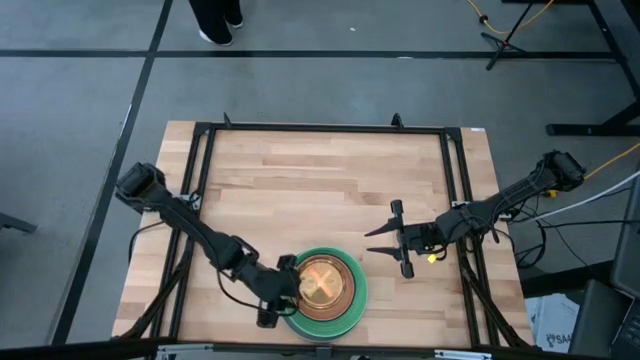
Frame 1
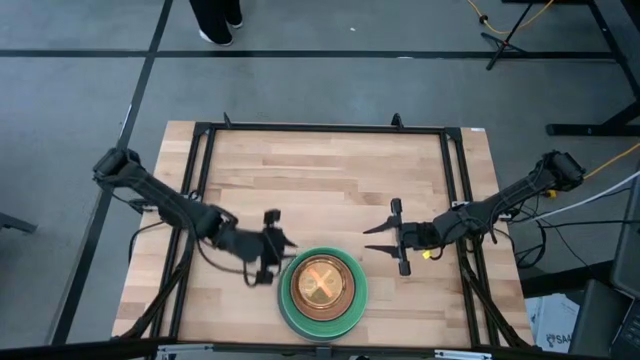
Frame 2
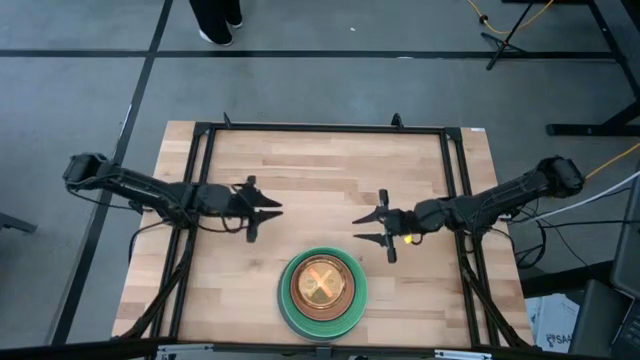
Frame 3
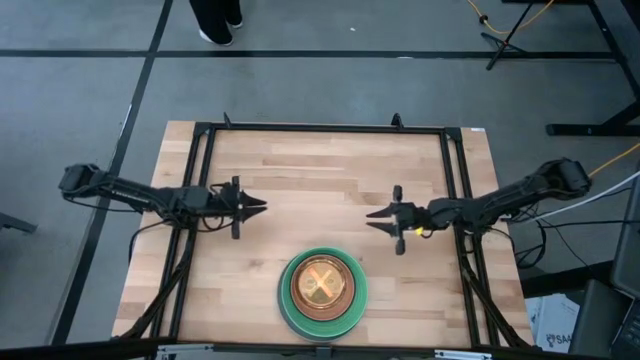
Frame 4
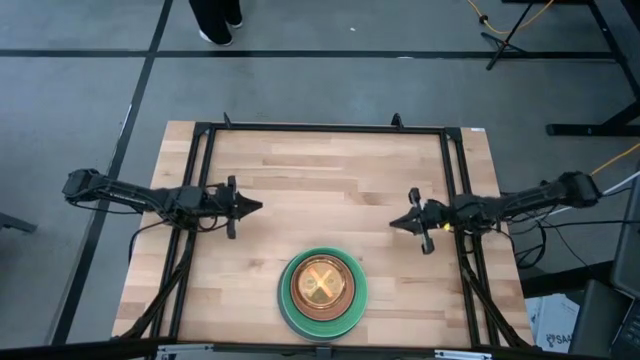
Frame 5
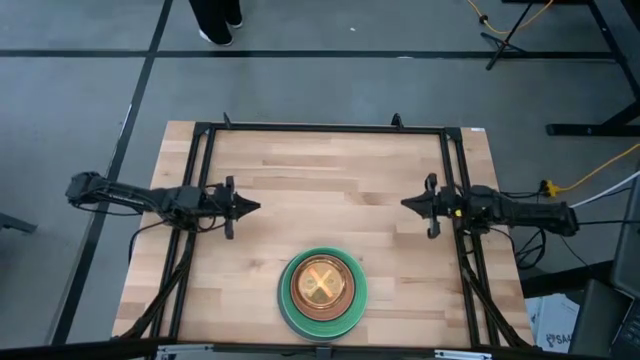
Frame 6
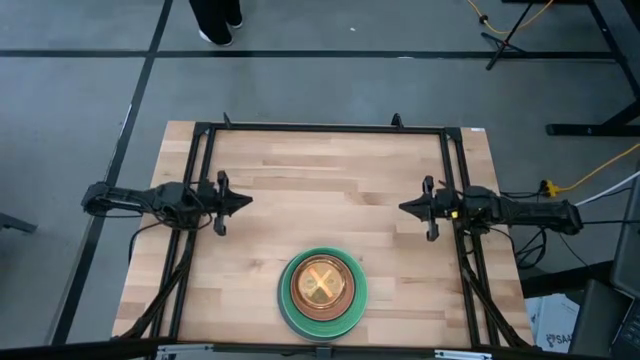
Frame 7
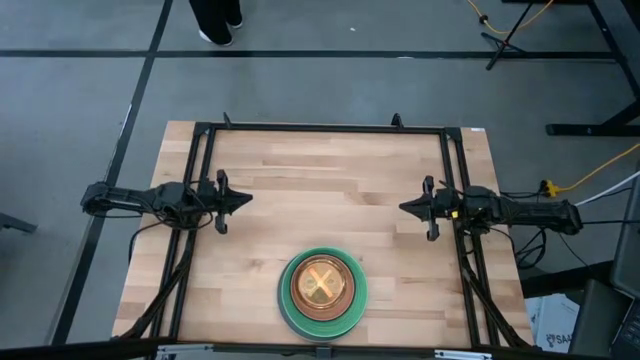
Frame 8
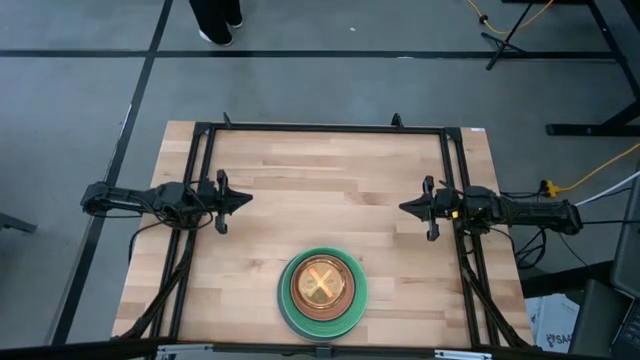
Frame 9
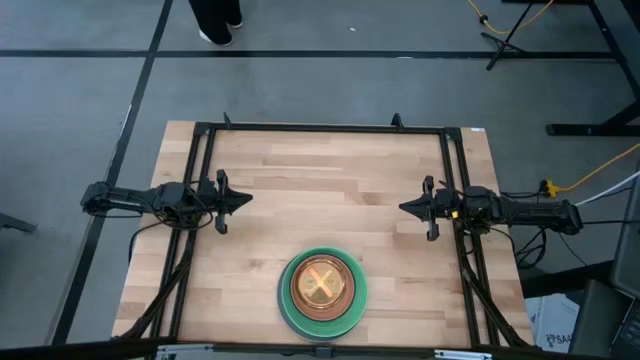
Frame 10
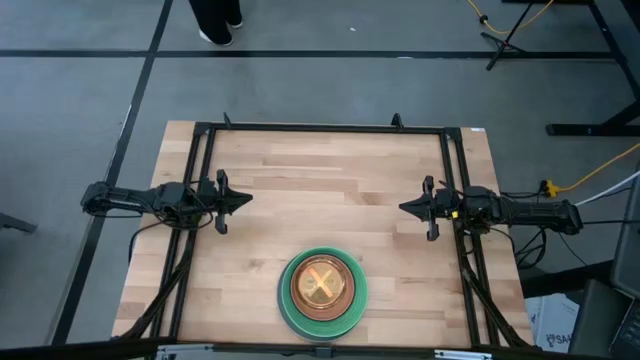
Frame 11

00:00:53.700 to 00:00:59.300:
Task: Stack plastic plates
Return to Home Position

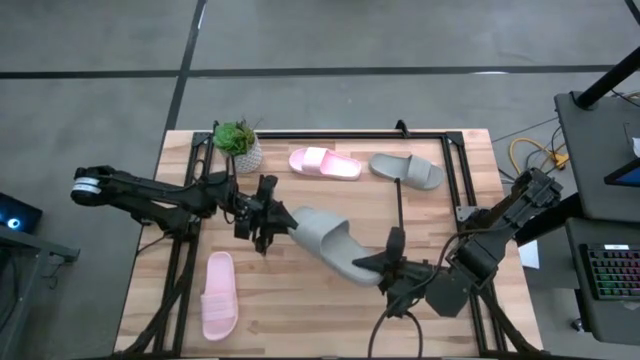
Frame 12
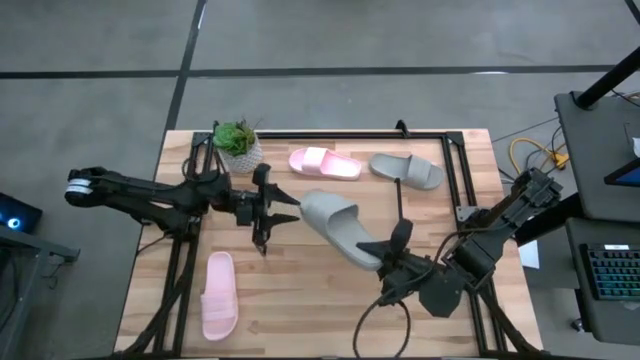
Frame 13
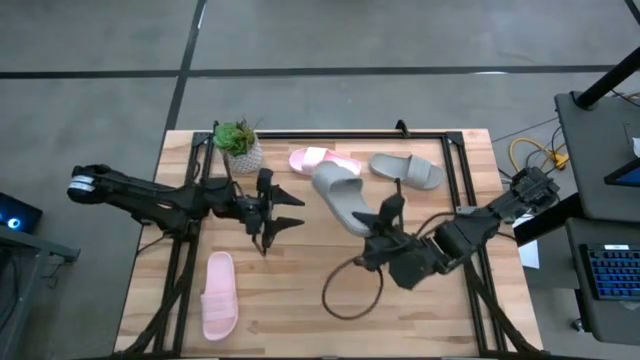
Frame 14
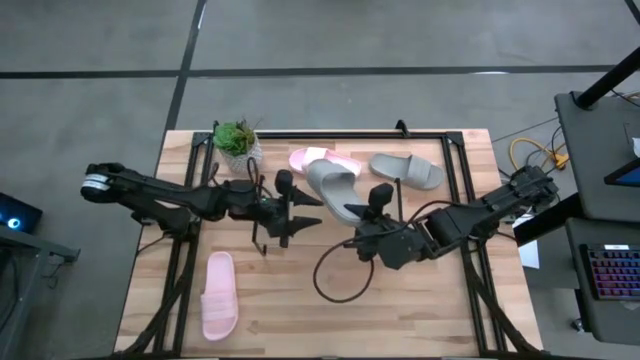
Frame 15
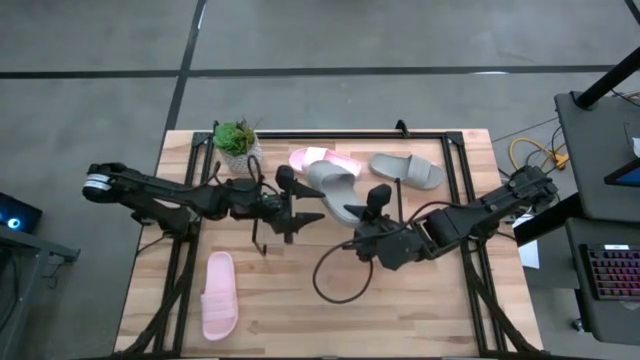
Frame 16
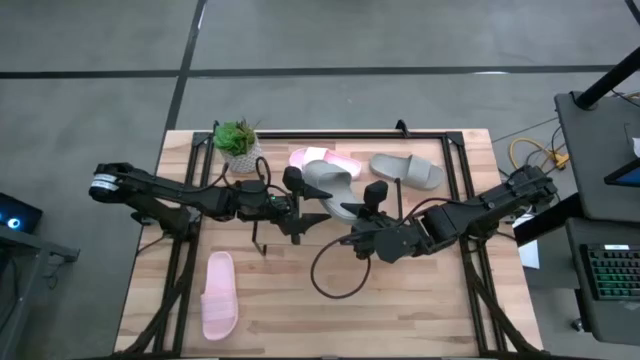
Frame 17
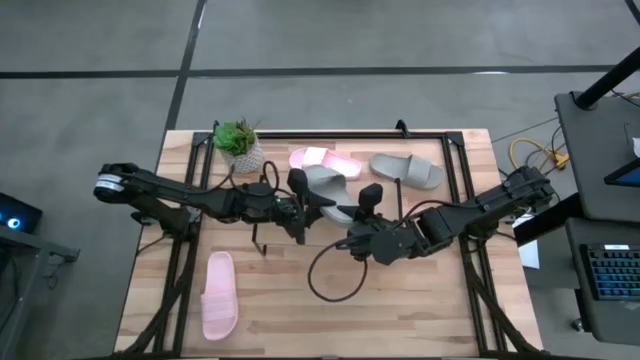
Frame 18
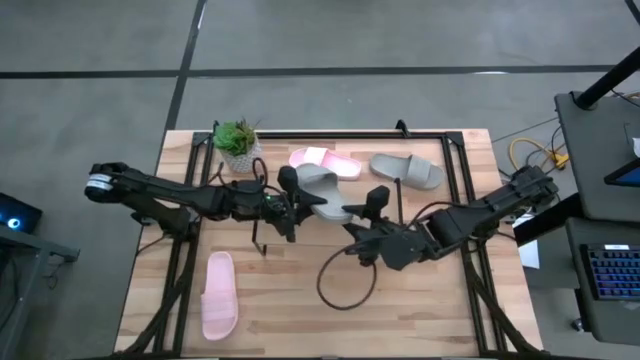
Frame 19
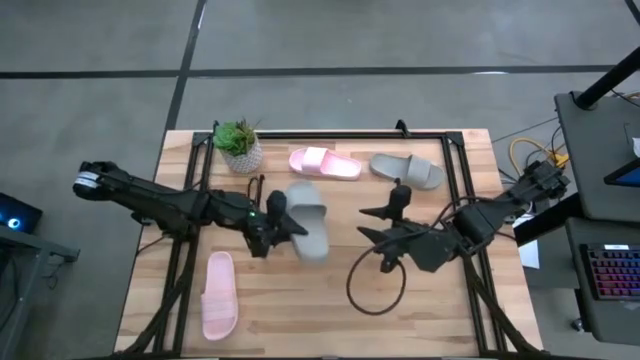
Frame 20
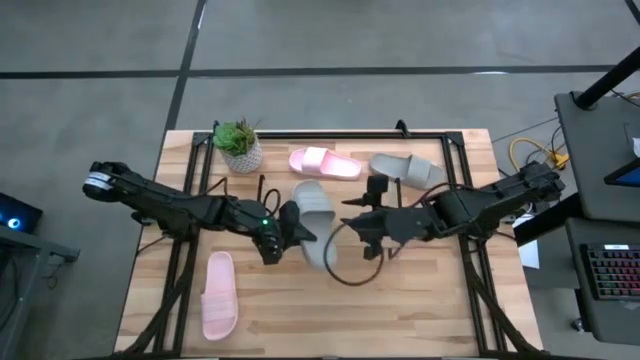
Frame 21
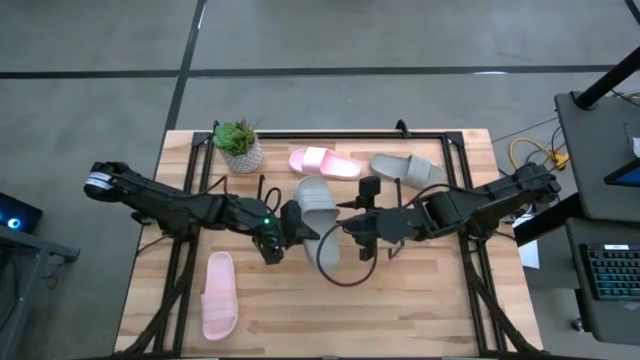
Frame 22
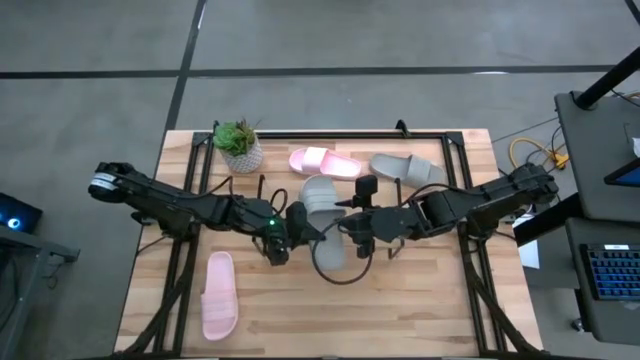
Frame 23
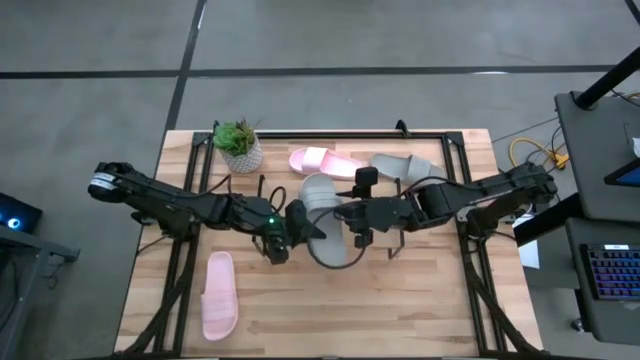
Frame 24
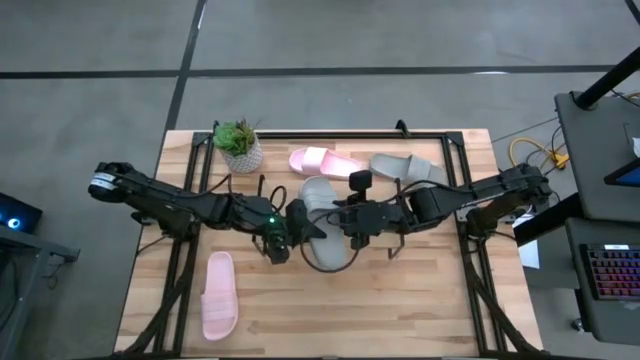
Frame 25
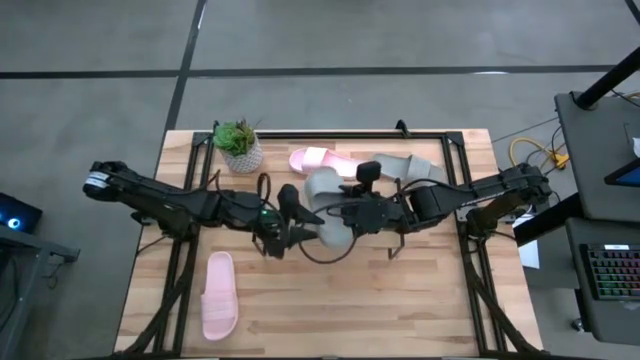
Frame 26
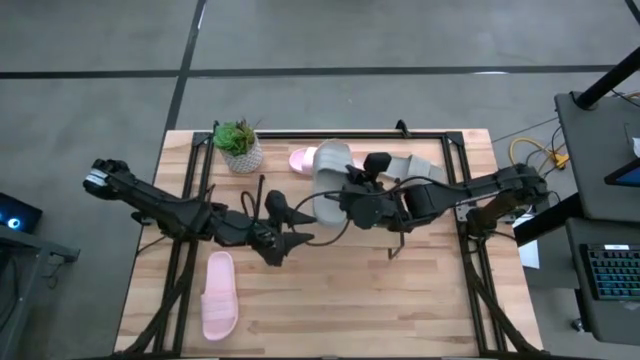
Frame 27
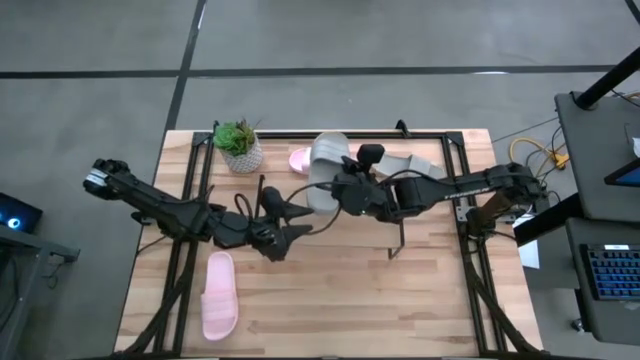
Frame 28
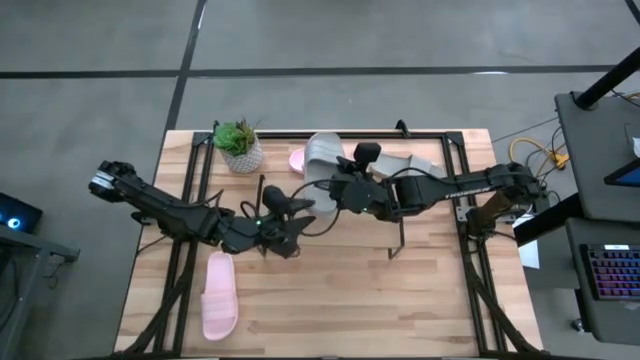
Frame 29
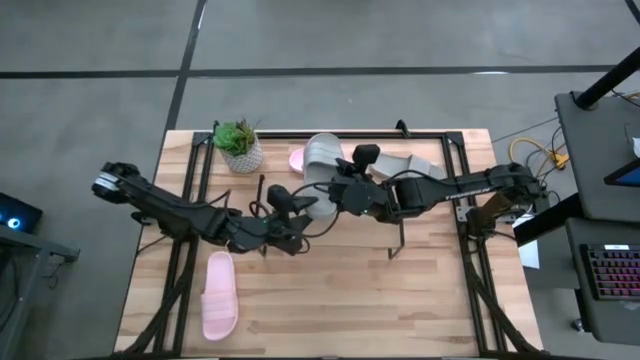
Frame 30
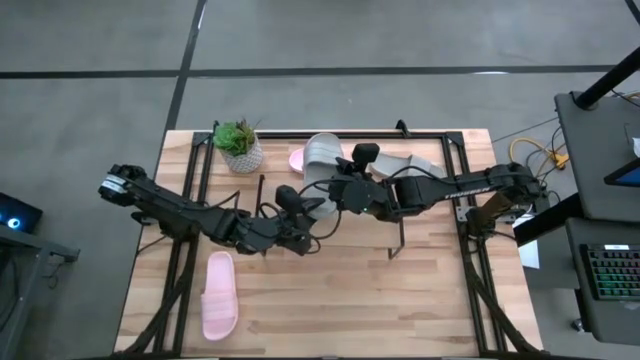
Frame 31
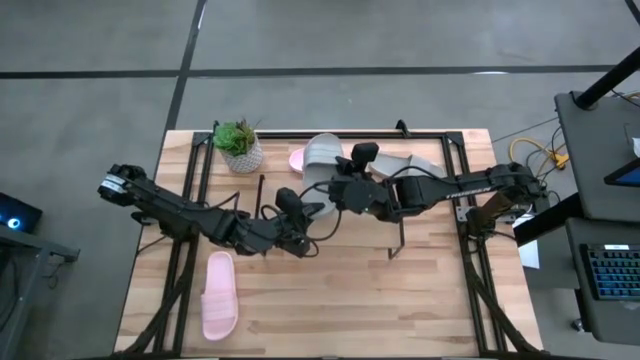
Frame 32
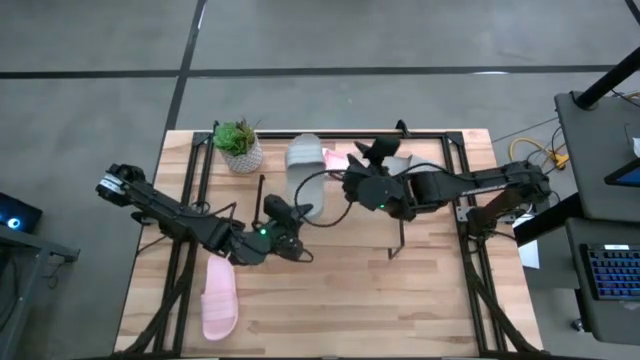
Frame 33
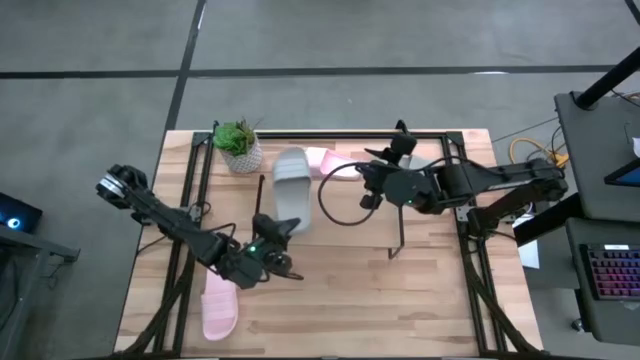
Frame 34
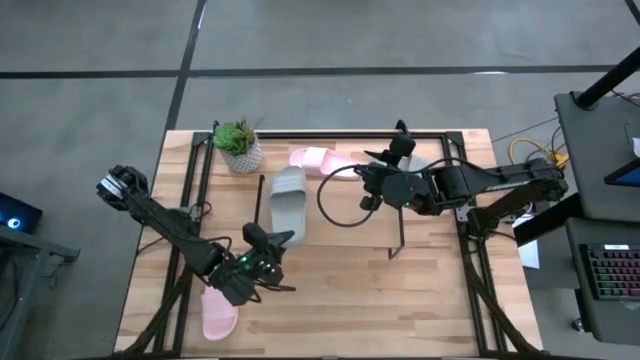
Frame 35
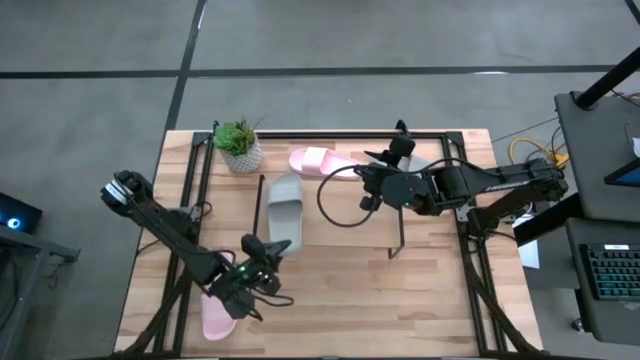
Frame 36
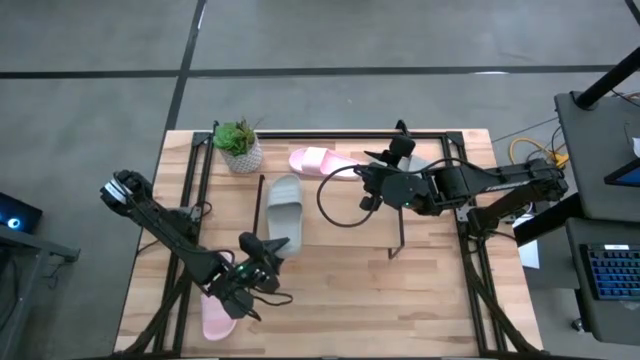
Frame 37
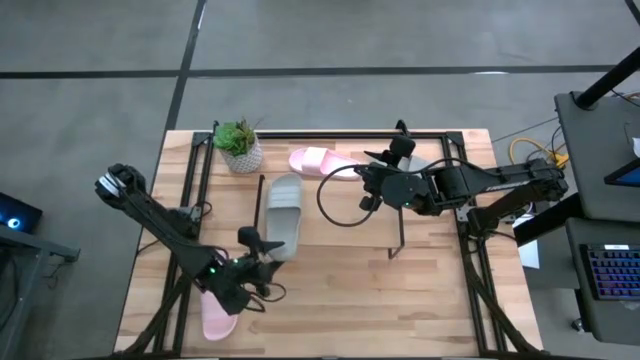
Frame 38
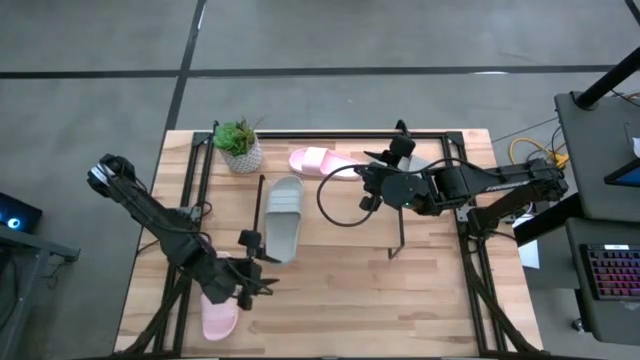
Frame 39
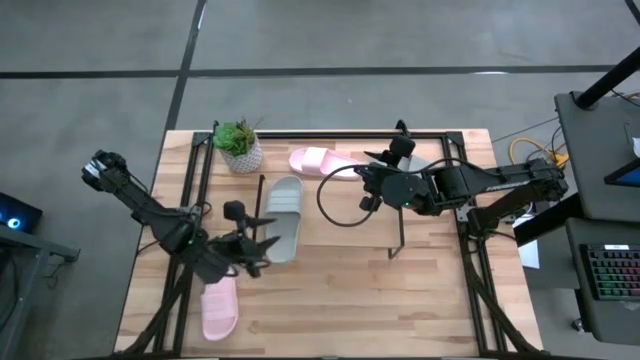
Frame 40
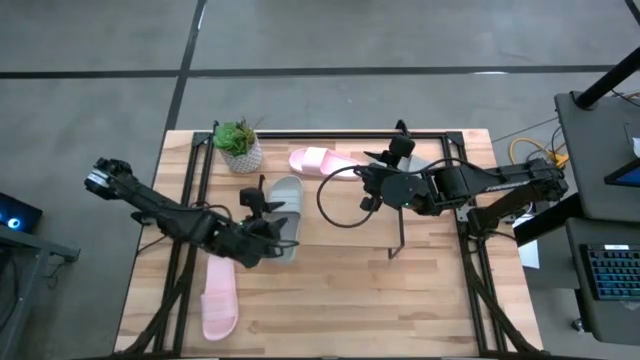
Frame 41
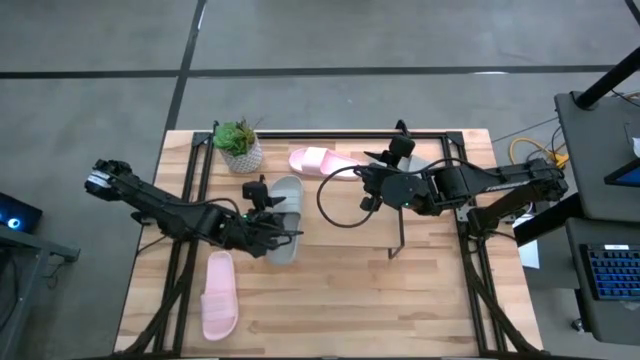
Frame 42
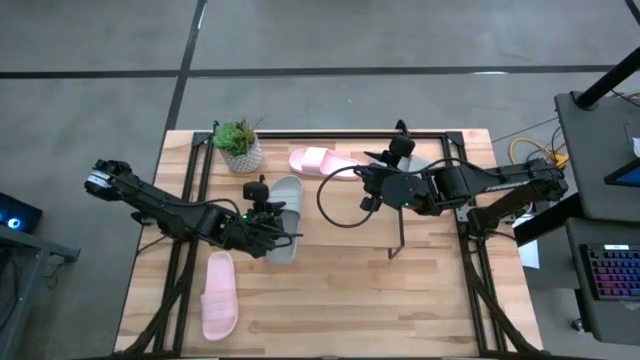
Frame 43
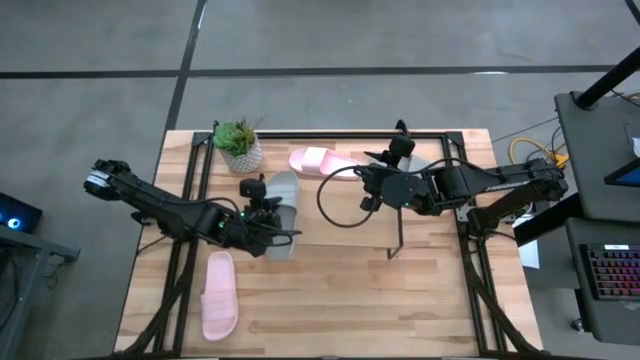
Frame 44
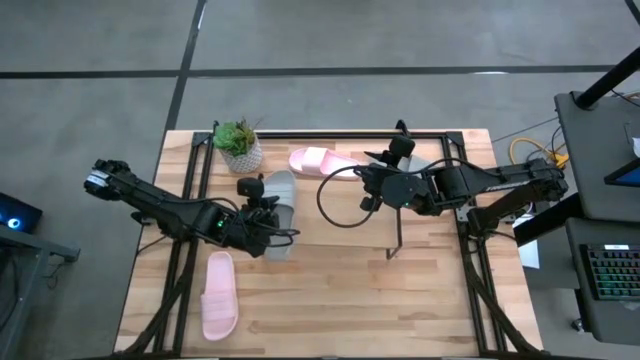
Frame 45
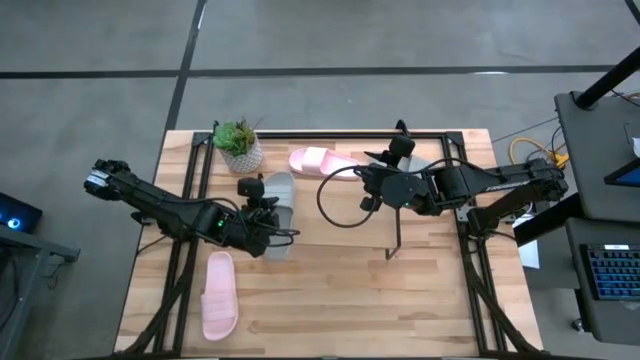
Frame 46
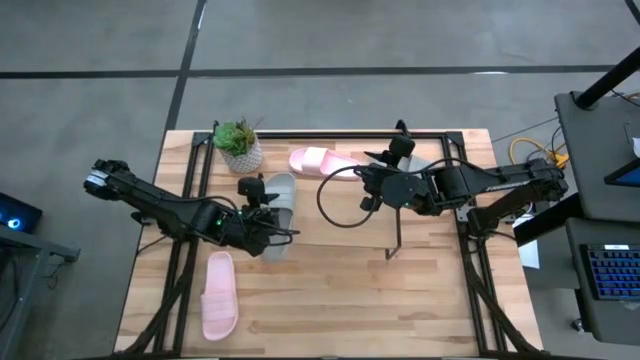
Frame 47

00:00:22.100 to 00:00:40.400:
Task: Pick and place slides into the shelf
Put the bottom gray slide on the shelf
